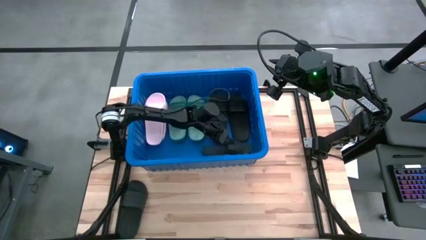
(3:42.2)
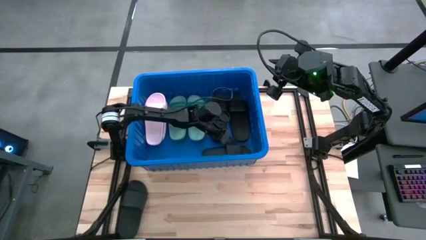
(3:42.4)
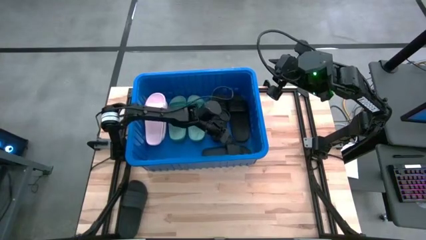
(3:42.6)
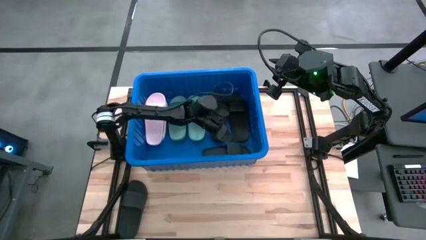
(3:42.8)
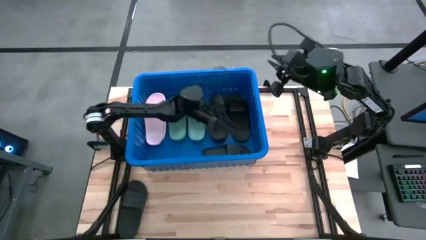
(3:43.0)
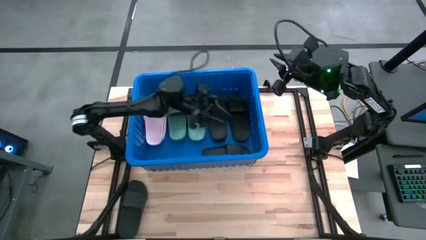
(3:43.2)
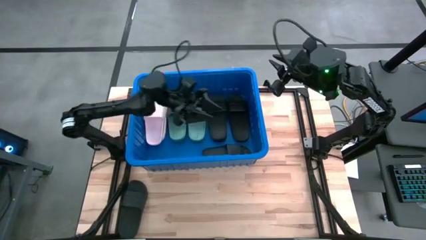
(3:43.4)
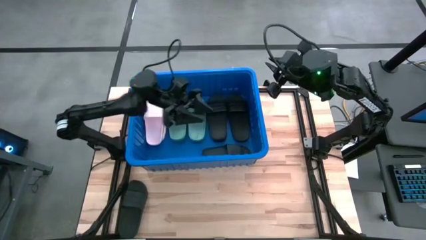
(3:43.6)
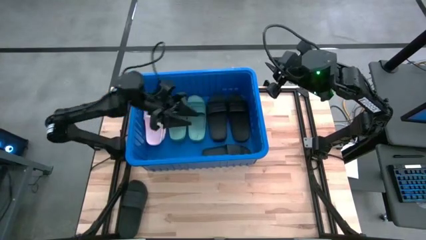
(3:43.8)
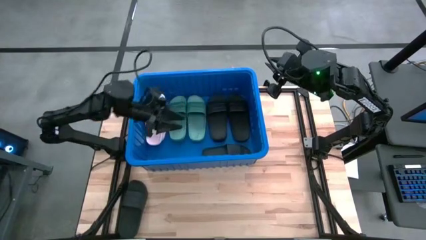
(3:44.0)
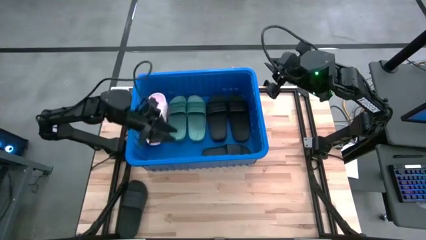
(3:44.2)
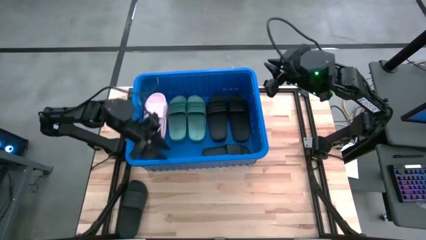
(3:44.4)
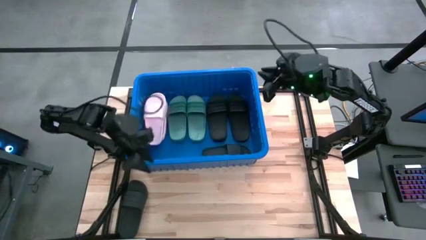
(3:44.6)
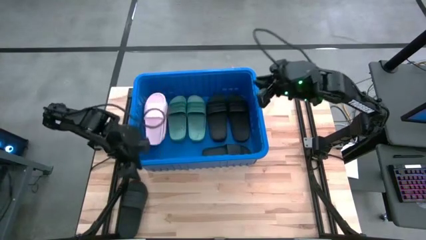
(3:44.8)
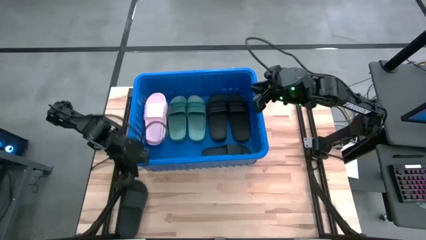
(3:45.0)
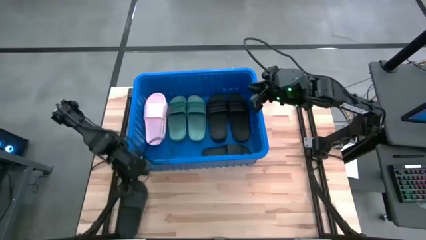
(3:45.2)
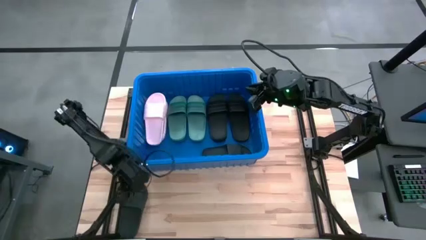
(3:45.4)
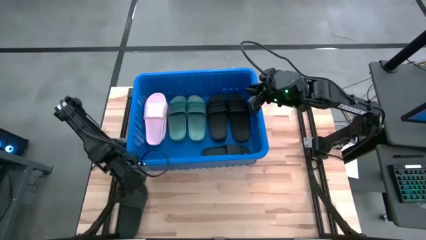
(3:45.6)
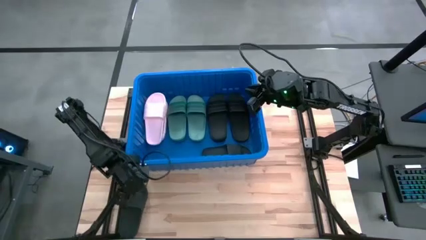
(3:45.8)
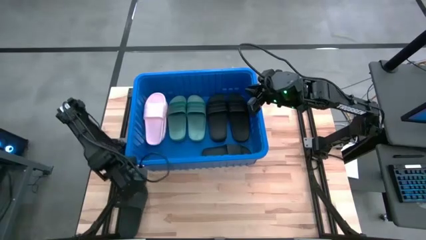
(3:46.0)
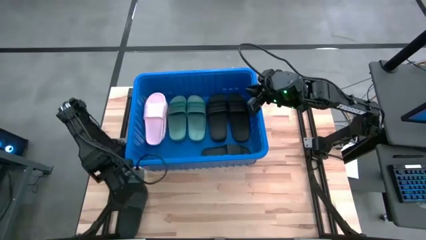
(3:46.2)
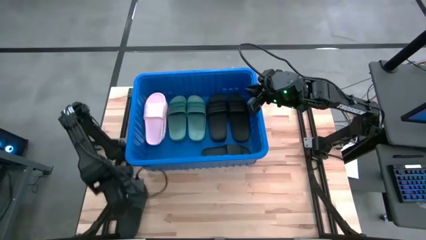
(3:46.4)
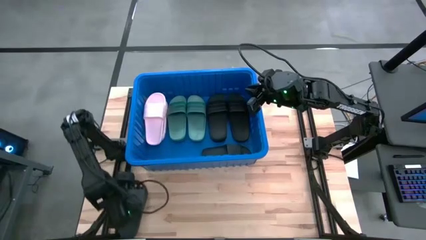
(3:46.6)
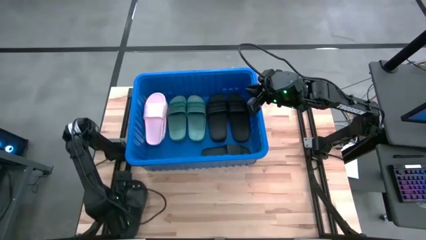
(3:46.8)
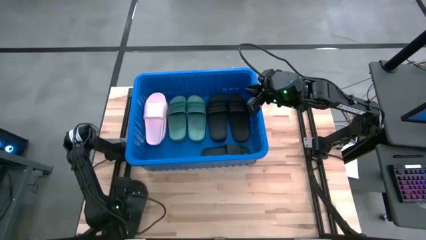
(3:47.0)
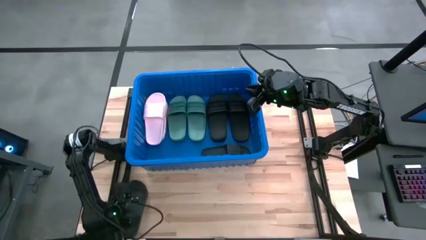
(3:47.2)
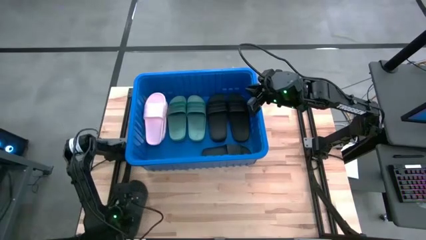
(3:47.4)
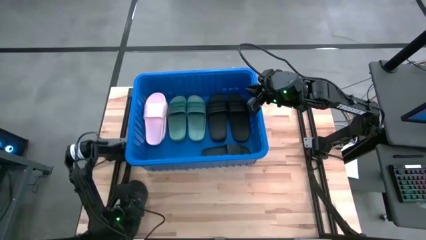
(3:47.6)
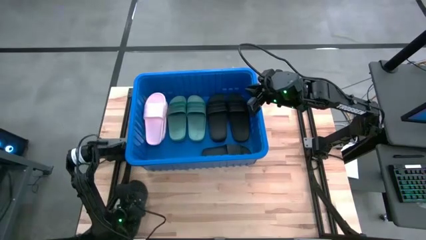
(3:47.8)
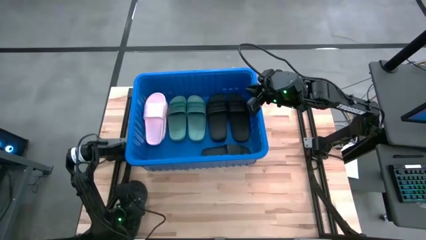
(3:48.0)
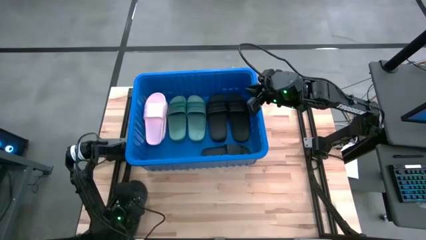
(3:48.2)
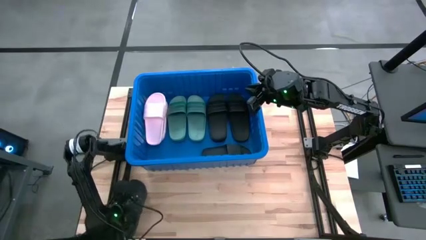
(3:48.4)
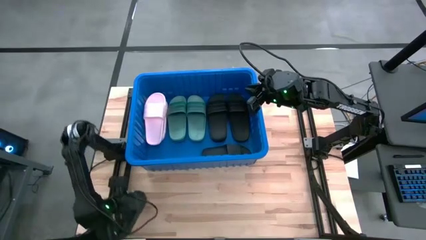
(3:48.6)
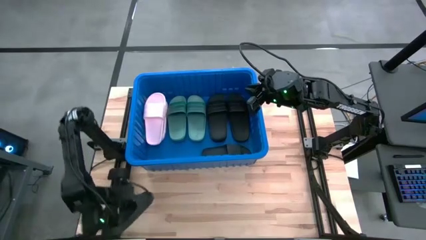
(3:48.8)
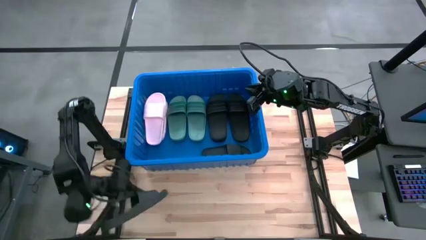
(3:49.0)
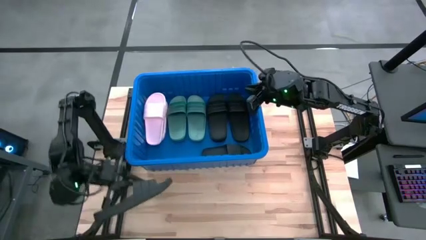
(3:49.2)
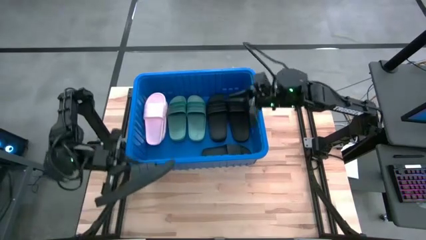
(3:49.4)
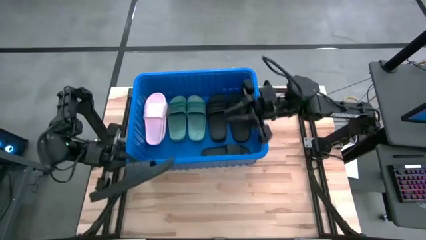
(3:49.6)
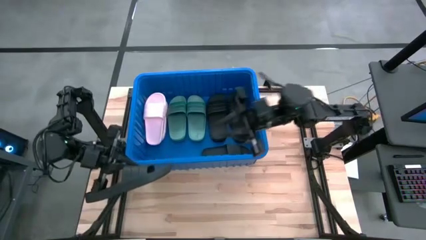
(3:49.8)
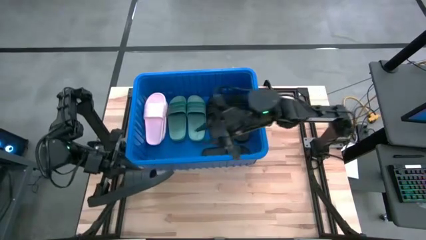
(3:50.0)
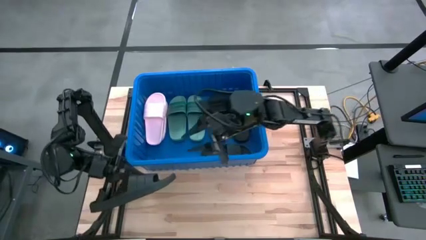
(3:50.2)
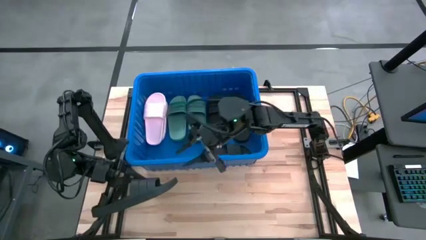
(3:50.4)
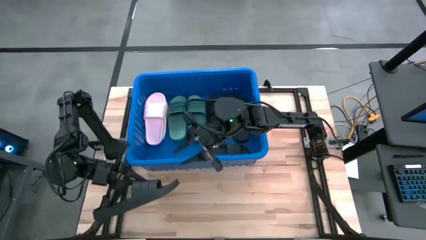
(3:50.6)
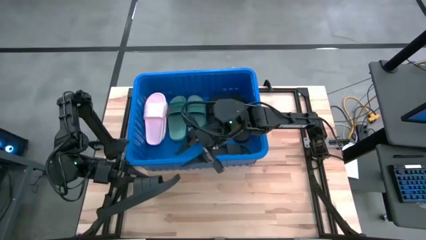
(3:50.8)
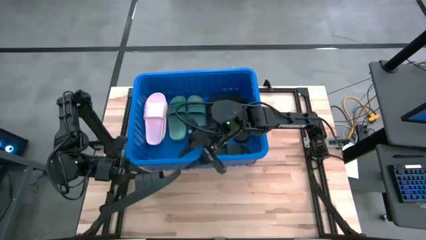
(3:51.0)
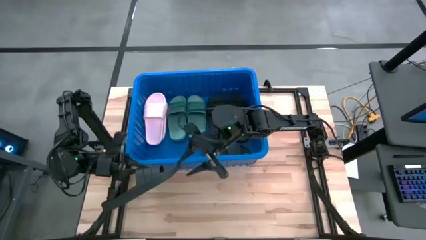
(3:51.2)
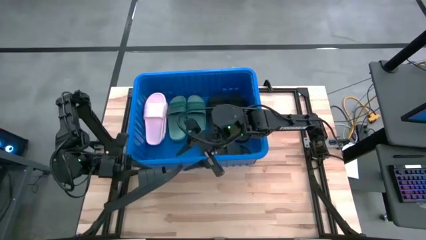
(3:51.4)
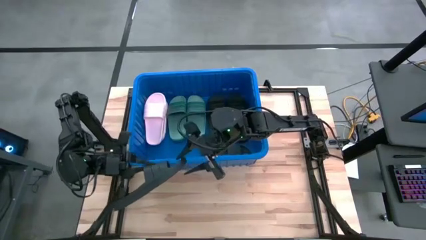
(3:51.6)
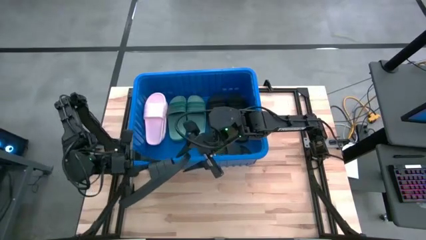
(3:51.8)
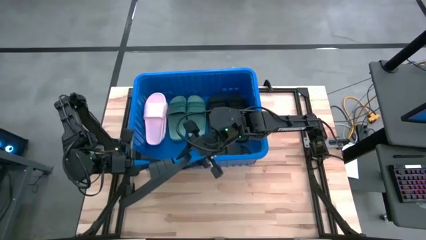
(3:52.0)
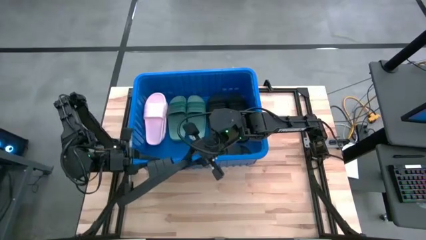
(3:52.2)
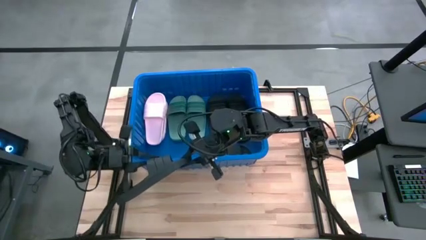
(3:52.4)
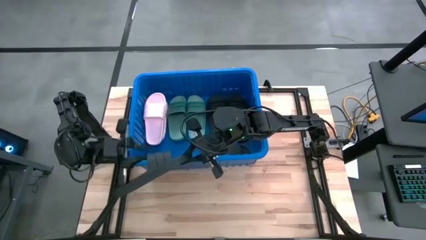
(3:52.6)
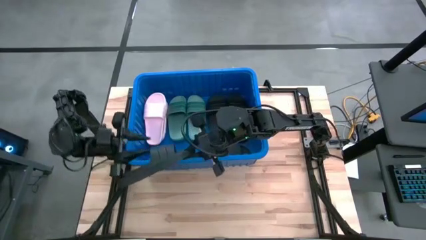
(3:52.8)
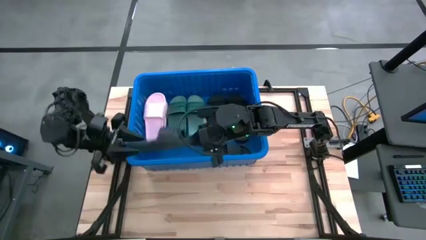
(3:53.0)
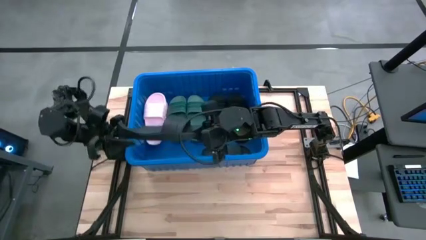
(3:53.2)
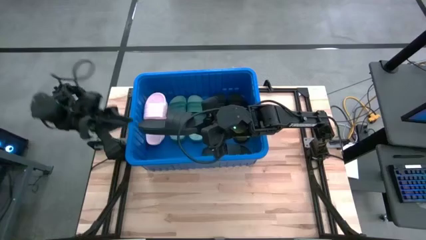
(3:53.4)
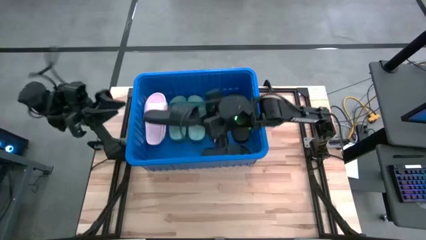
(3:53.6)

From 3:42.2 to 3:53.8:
Task: Pick and place slides into bin
Put the black slide into the blue bin

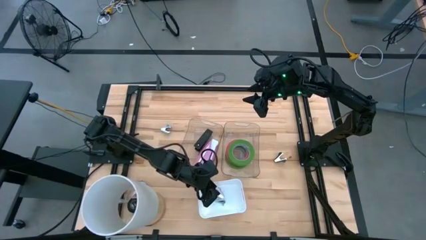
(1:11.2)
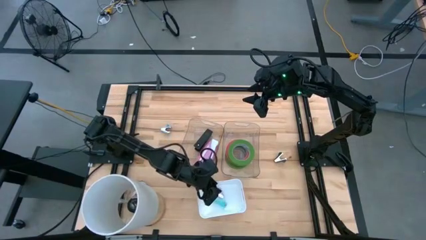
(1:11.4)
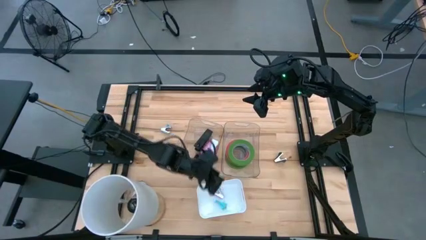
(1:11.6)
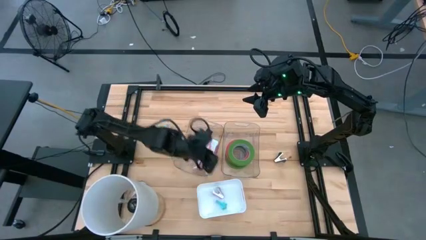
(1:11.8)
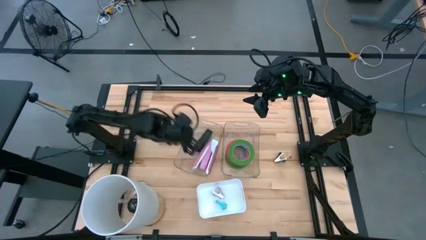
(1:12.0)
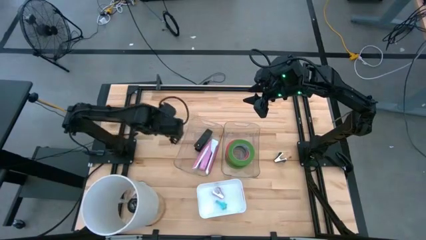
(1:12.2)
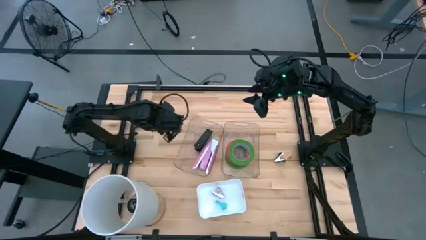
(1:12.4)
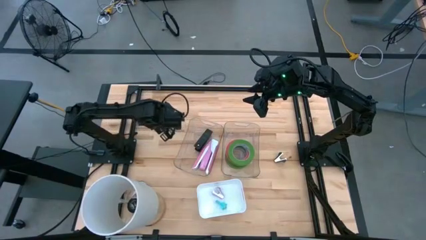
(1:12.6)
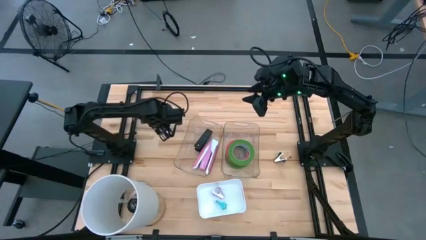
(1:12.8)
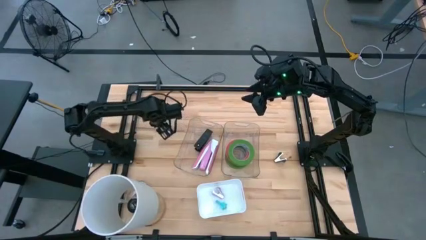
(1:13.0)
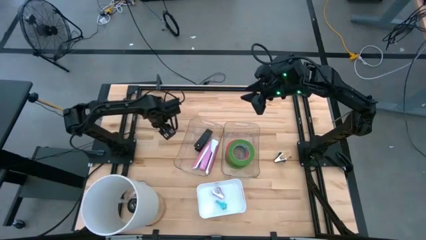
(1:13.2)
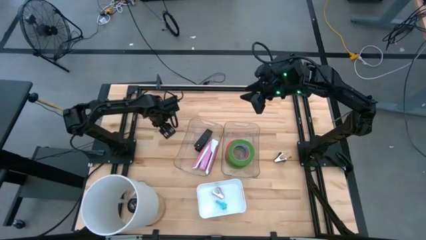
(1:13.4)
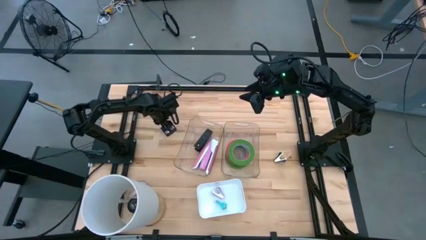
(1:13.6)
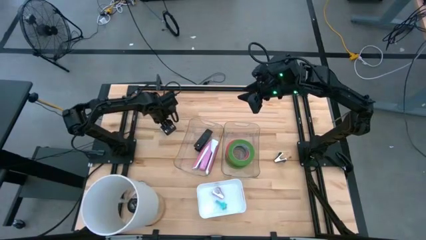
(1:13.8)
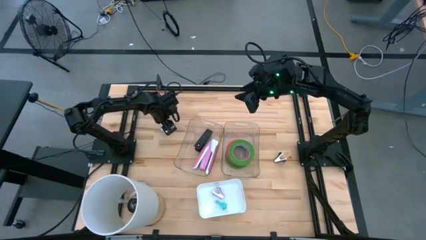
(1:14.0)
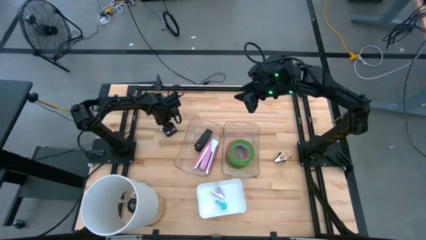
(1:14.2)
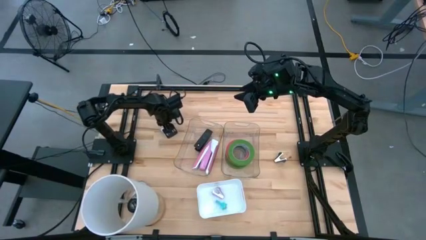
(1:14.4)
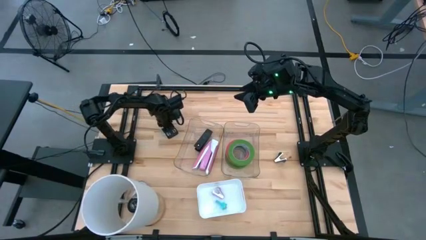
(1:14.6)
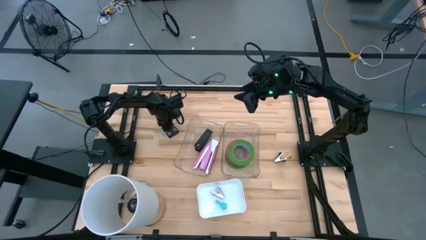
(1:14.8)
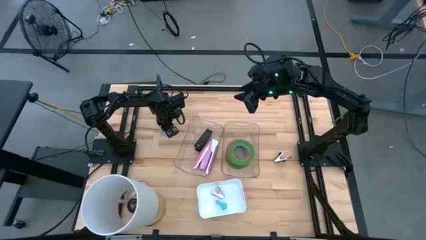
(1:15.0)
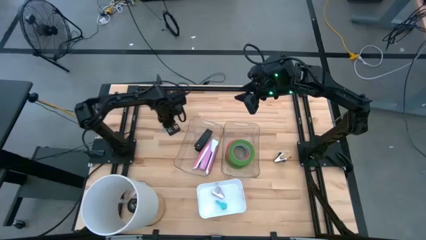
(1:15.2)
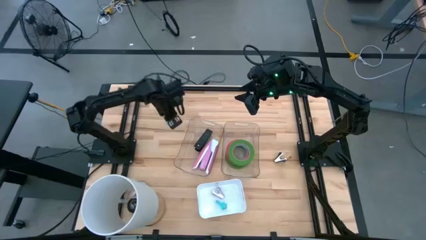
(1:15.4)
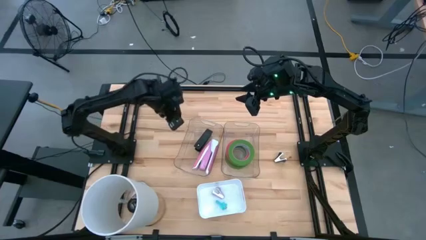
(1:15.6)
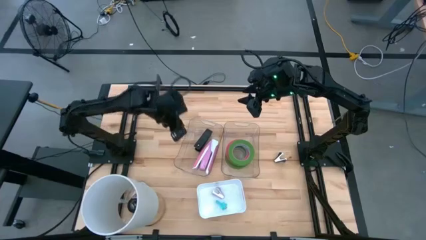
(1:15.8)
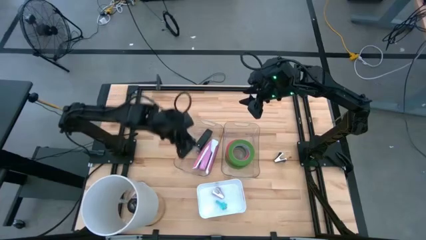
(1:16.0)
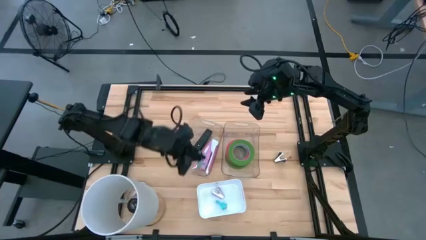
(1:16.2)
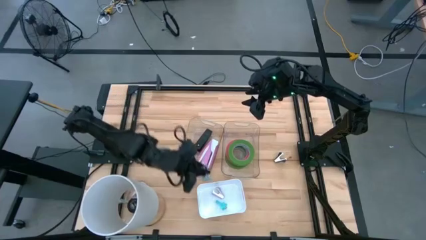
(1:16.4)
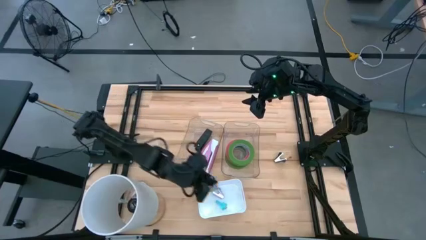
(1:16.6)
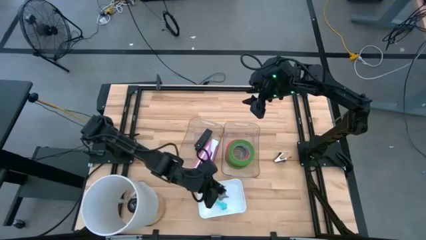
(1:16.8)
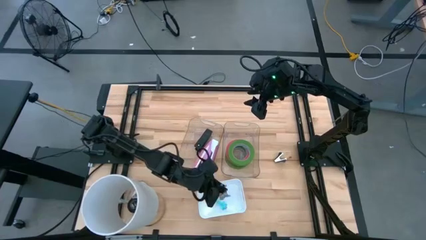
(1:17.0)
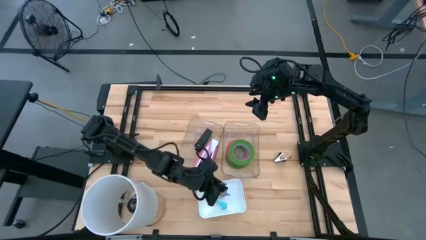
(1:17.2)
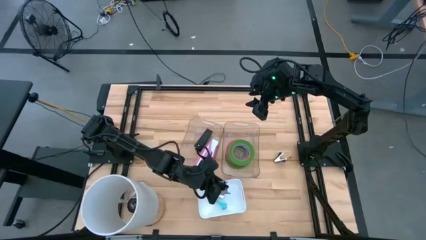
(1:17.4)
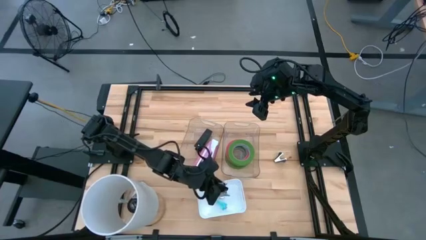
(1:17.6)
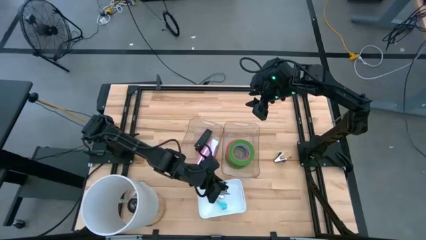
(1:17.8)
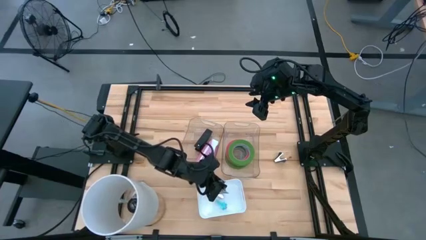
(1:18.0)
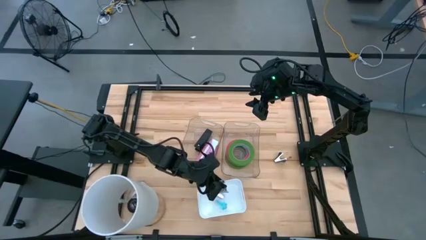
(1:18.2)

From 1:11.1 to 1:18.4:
Task: Pick and place Stapler, Stapler remover, tape
Put the gray staple remover into the white bin
